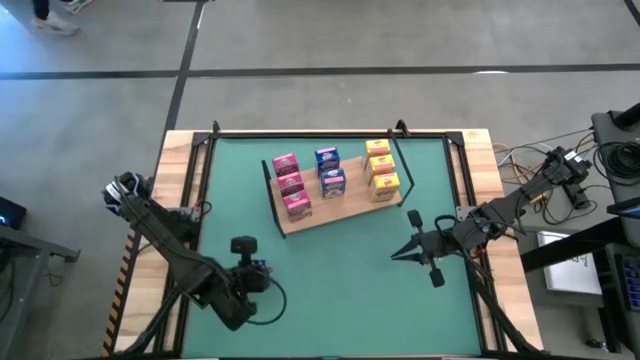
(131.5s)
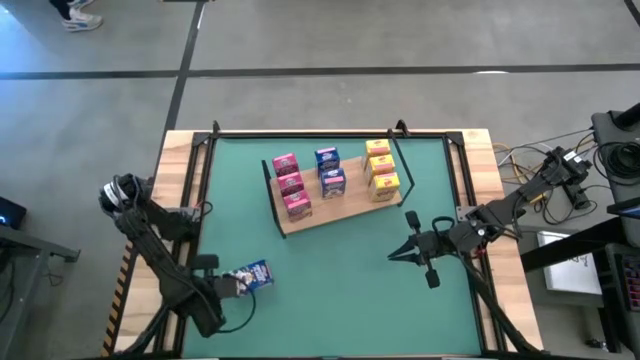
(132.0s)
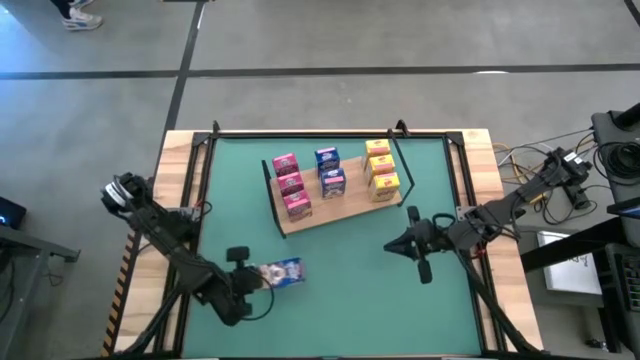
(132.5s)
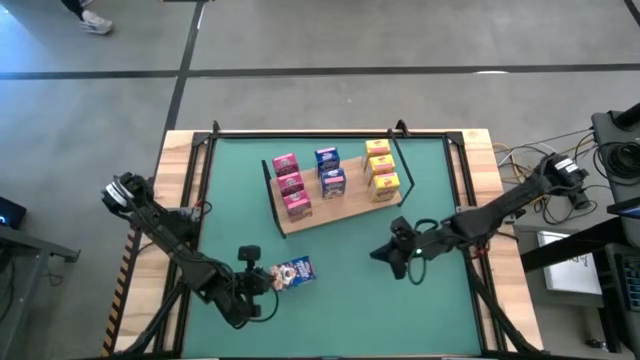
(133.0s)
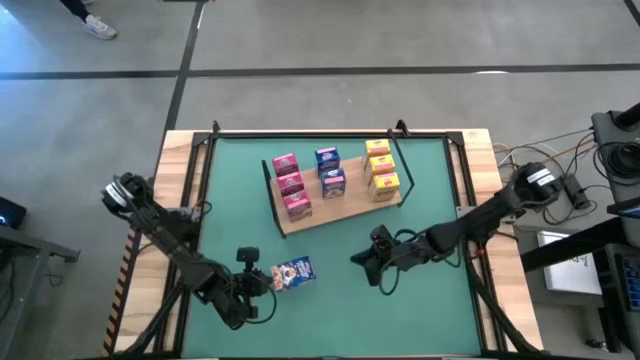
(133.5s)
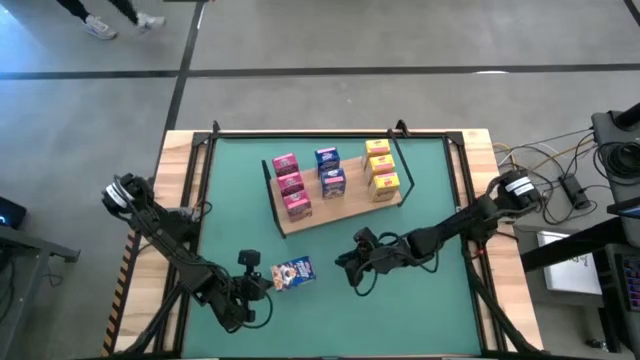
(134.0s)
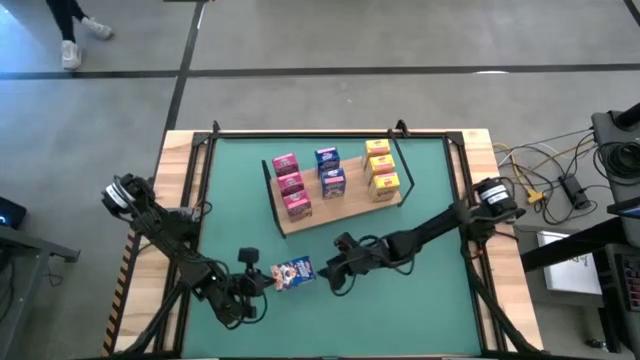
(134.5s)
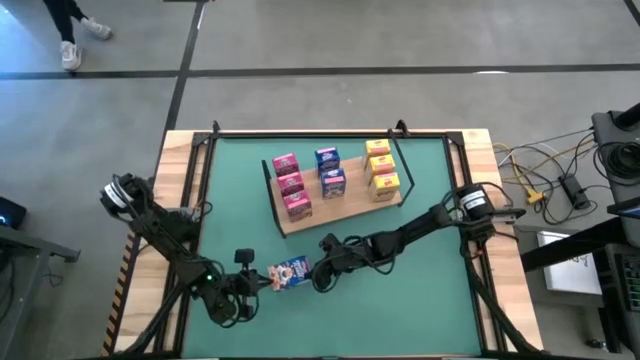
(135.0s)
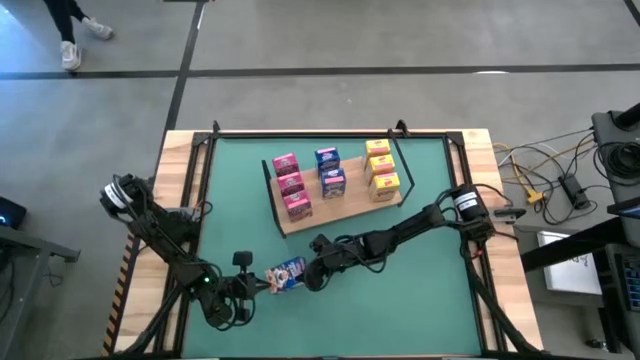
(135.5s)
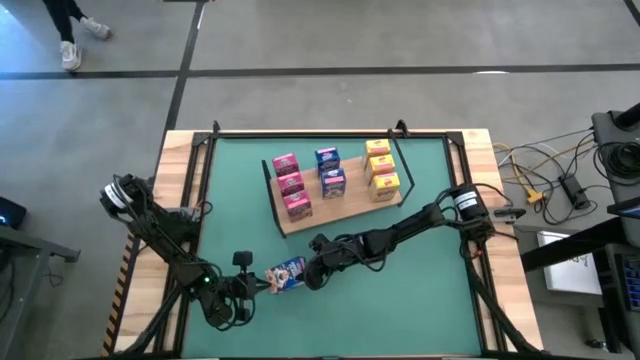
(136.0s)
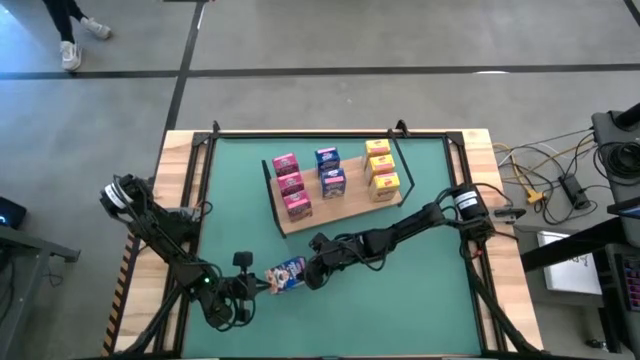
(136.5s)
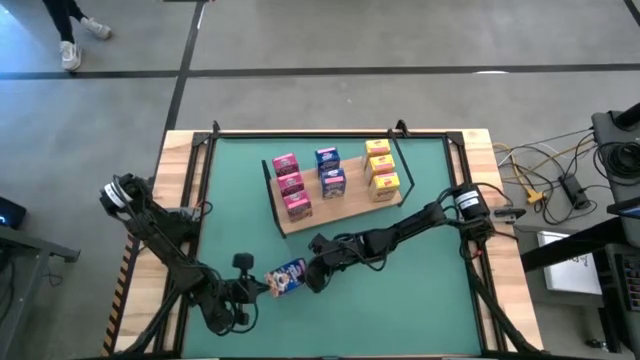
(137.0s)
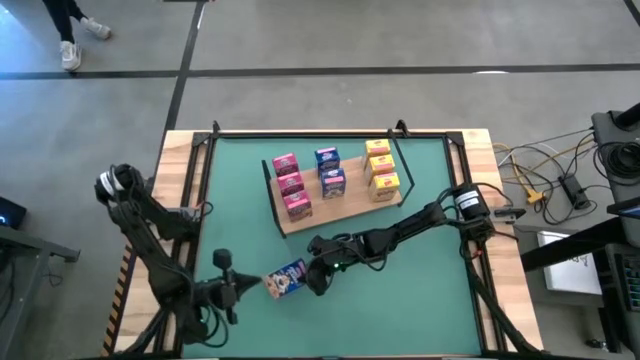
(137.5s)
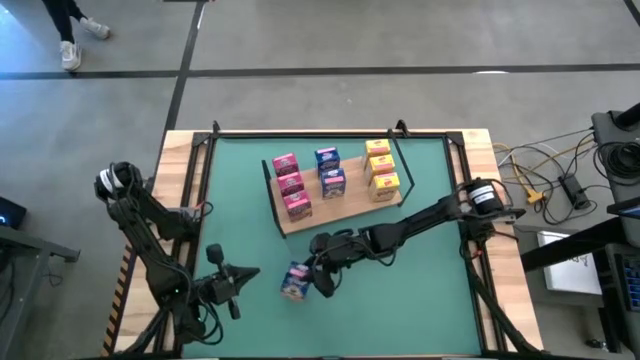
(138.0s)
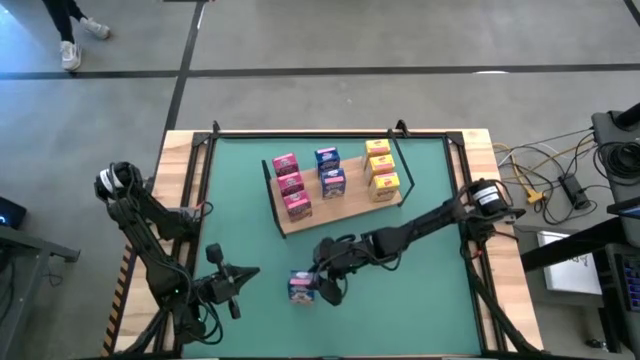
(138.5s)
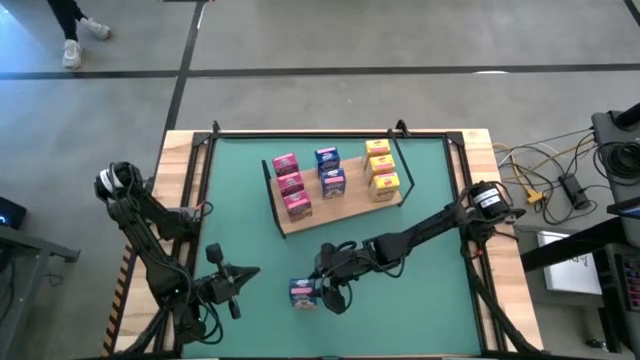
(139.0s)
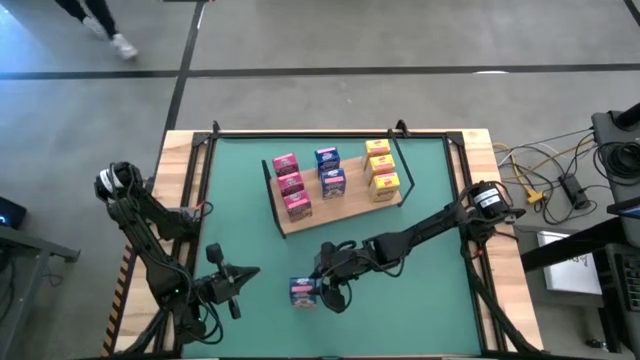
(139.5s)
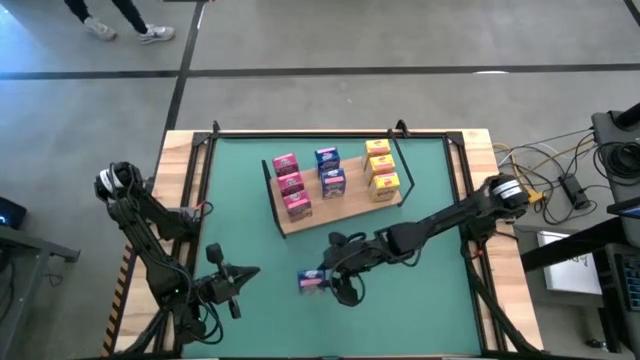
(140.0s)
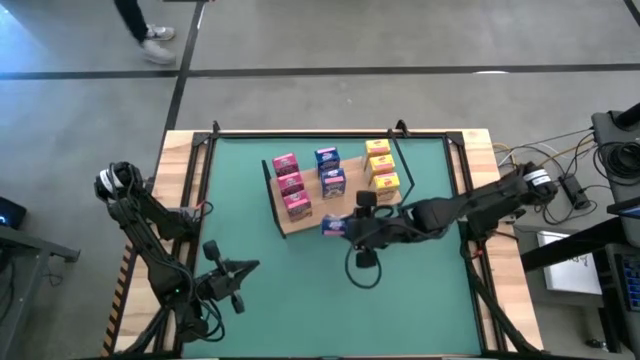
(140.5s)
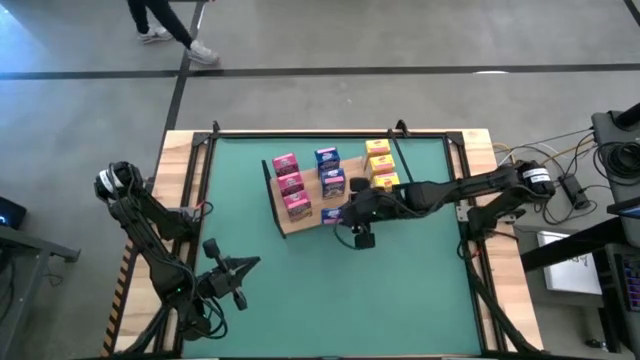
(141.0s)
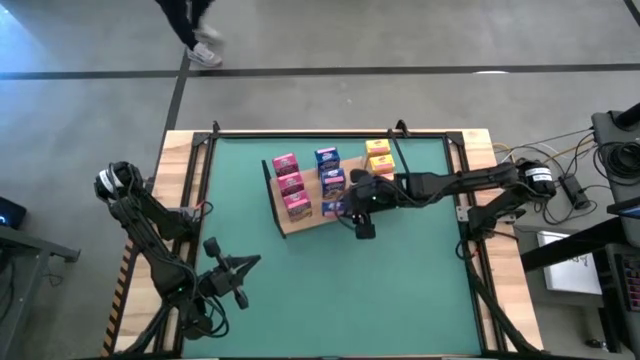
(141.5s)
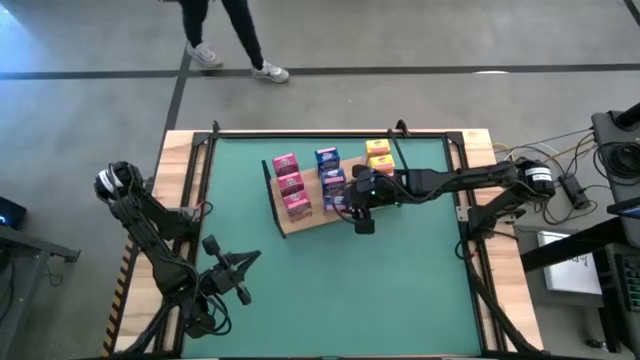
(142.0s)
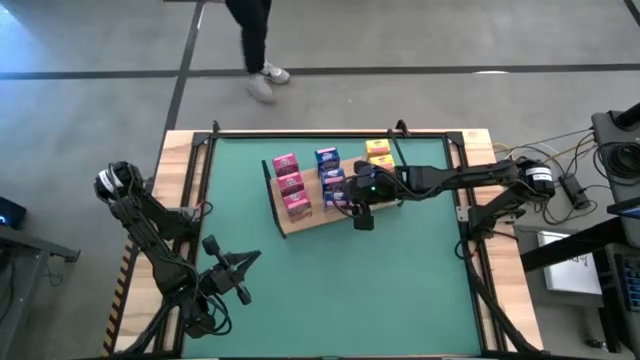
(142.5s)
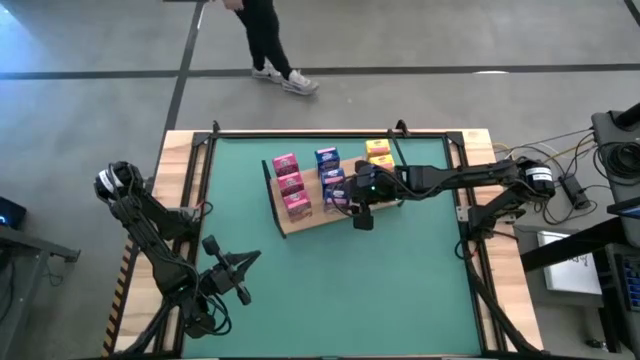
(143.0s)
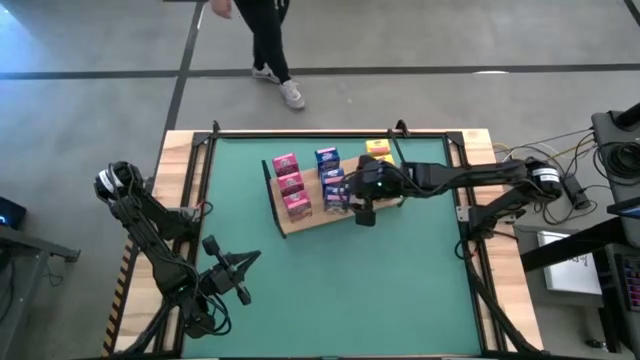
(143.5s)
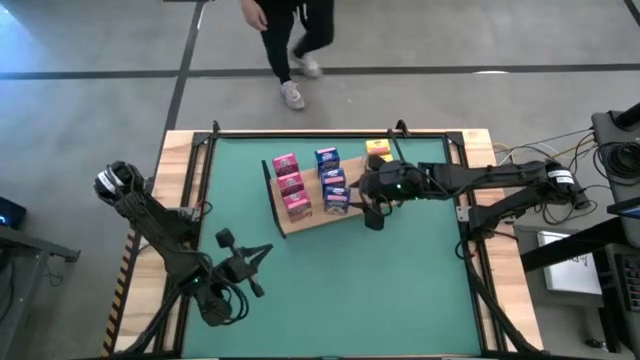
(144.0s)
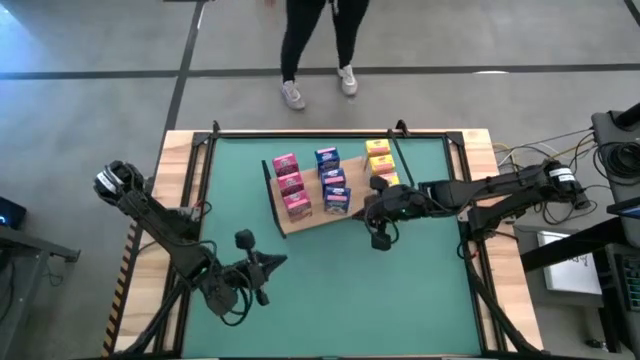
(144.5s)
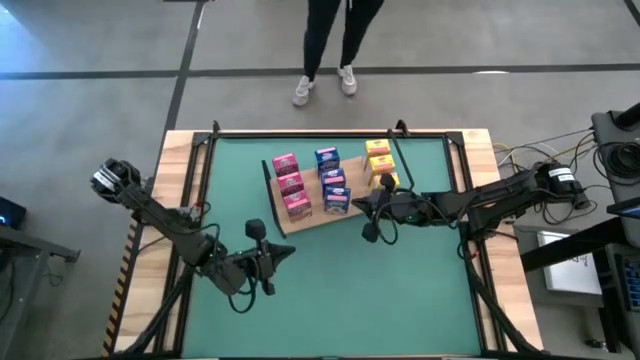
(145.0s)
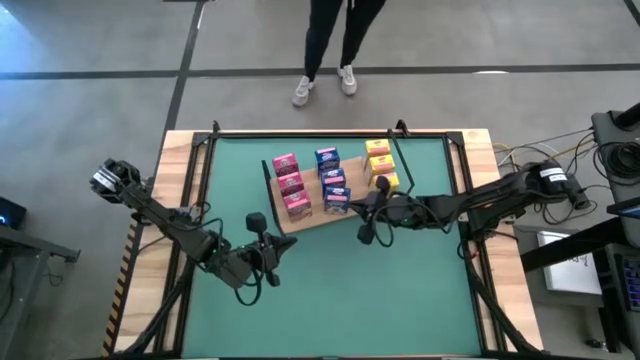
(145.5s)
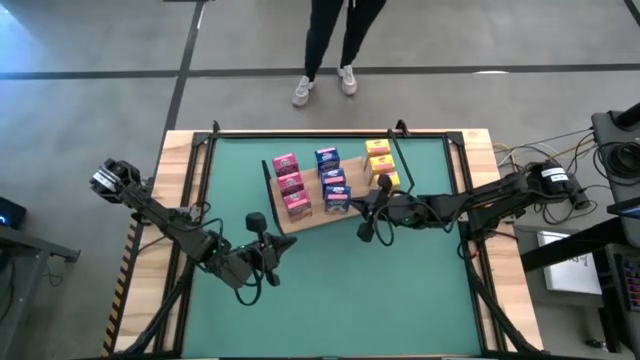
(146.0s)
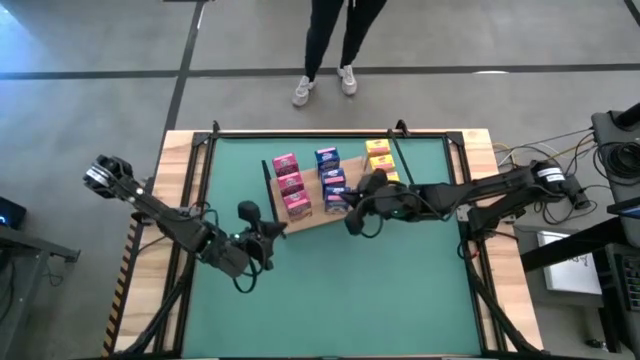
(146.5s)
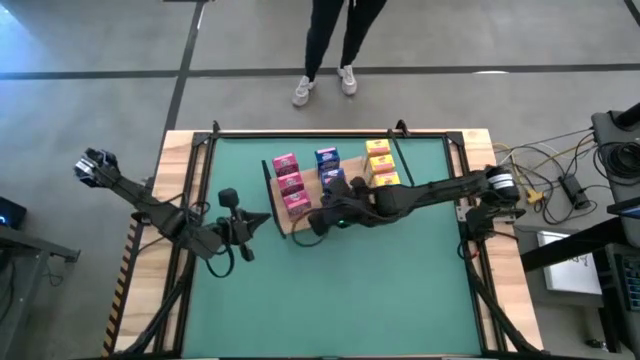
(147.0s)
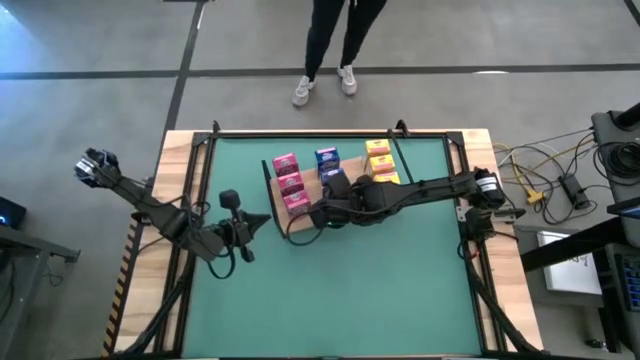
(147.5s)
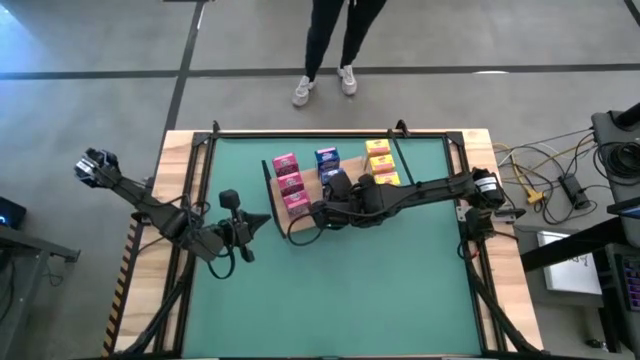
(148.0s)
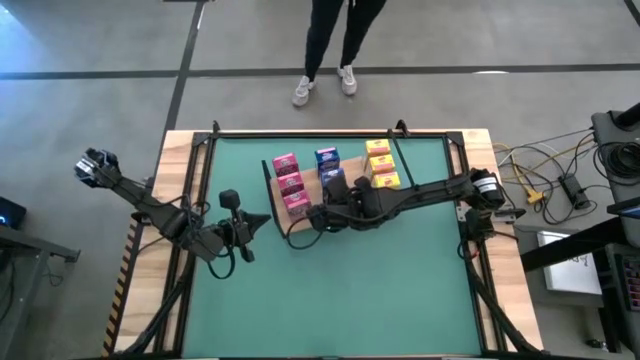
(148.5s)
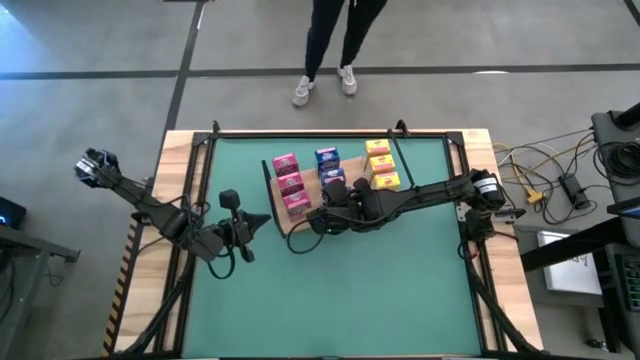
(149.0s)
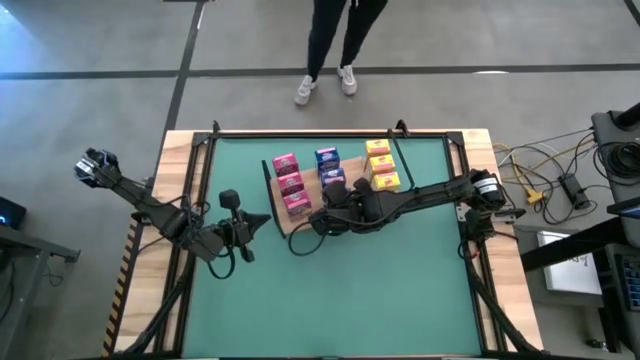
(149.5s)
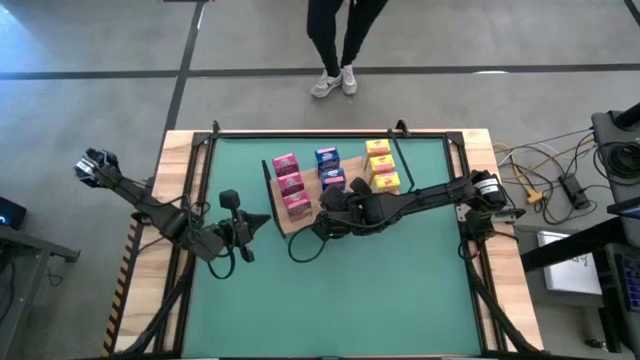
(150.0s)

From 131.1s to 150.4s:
Task: Stack cereal on shelf
Put the blue cereal box on the shelf aligned with the other blue cereal boxes

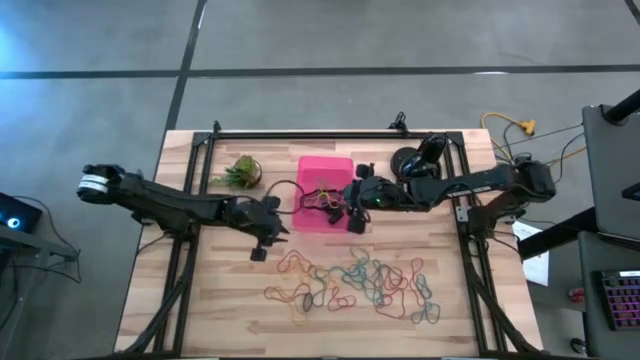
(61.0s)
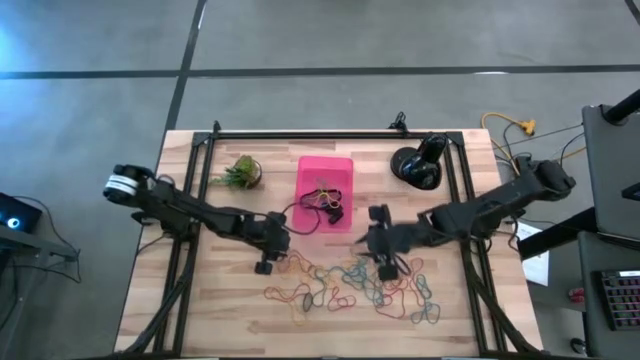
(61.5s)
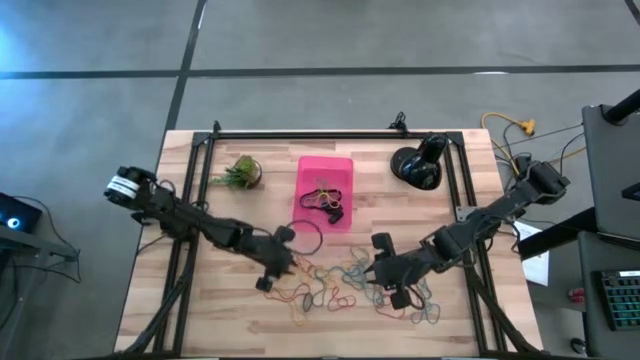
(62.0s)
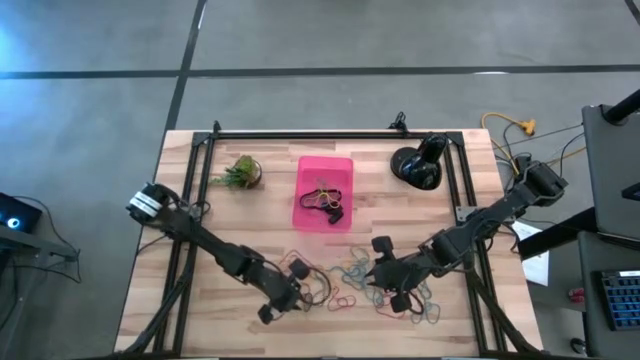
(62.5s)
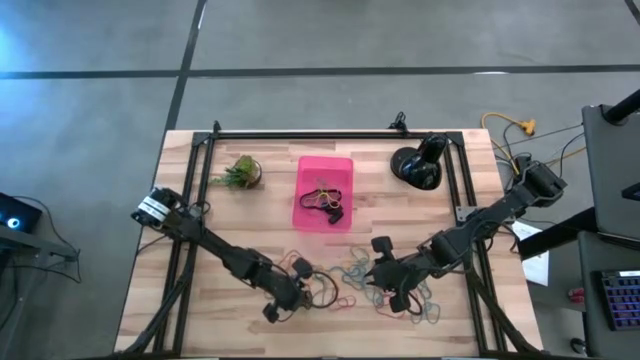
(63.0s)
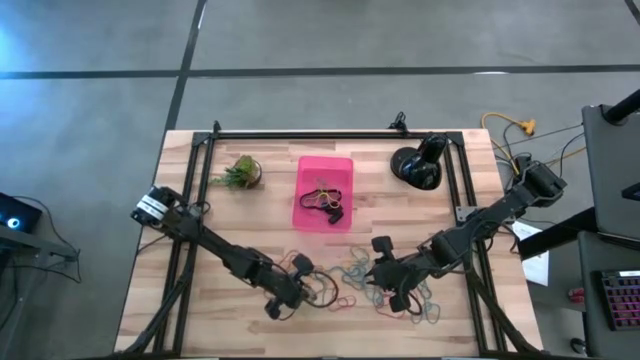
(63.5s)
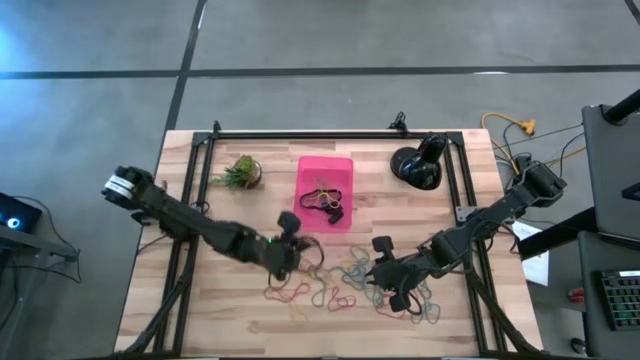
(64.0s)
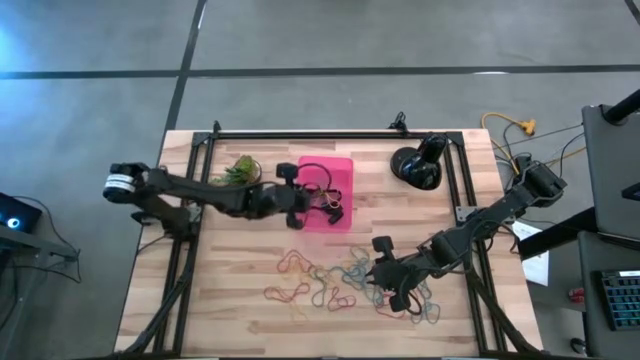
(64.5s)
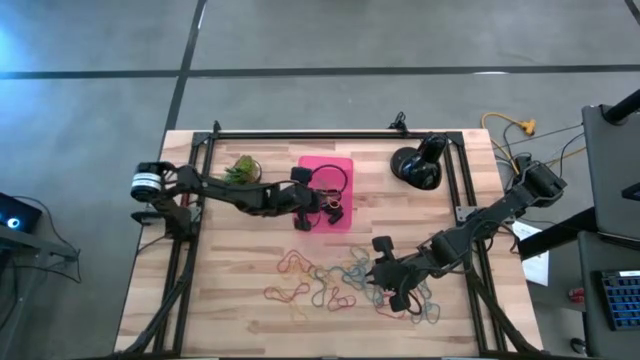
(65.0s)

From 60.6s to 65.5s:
Task: Pick and place rubber bands into bin
Put the black rubber bands into the pink bin
